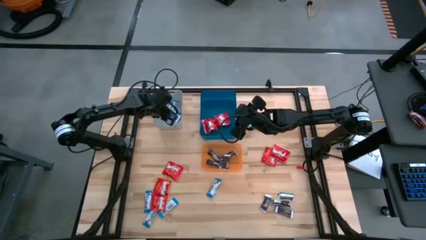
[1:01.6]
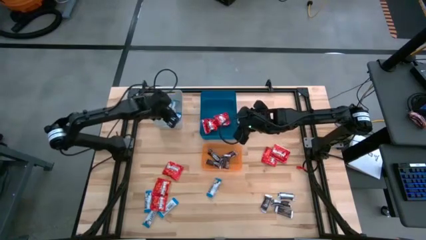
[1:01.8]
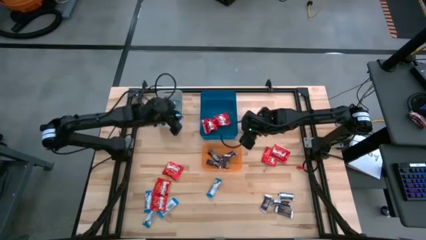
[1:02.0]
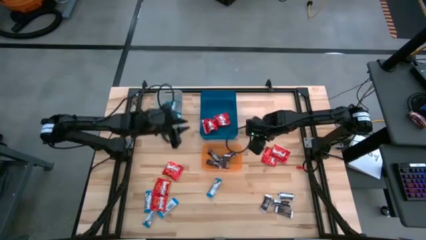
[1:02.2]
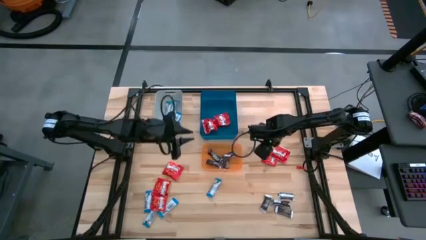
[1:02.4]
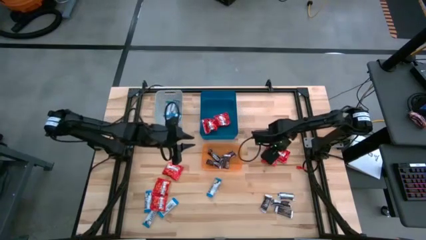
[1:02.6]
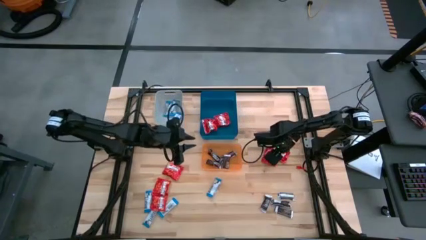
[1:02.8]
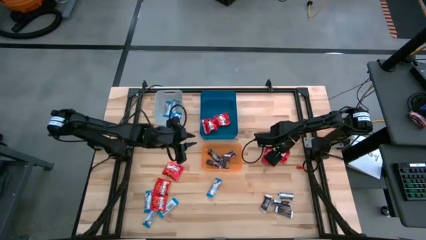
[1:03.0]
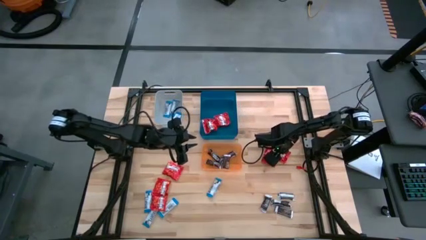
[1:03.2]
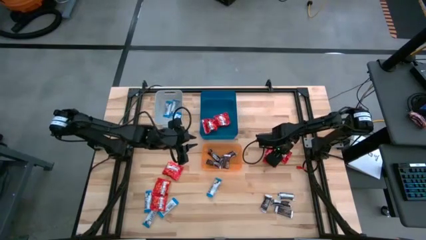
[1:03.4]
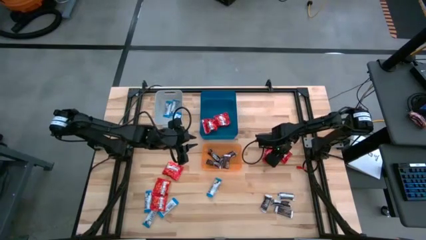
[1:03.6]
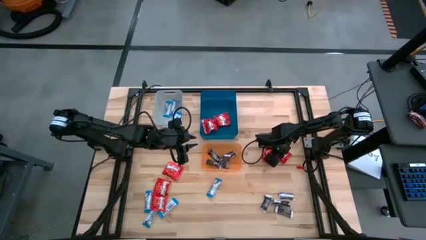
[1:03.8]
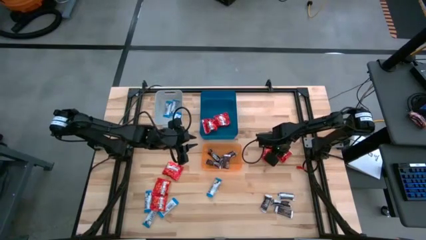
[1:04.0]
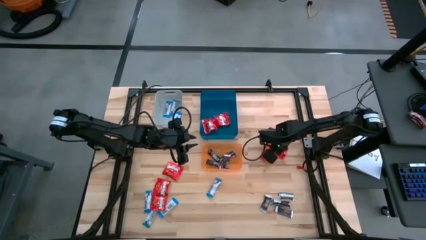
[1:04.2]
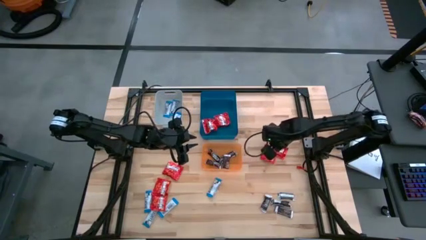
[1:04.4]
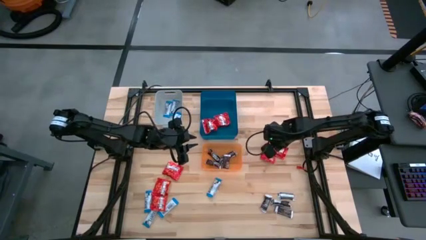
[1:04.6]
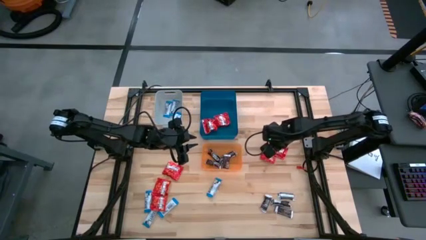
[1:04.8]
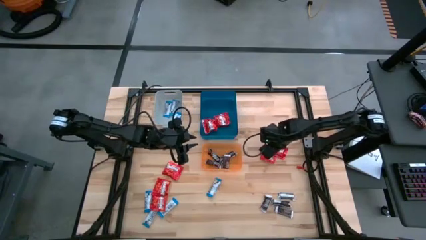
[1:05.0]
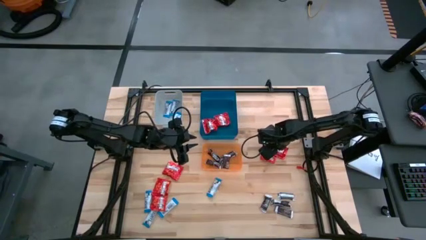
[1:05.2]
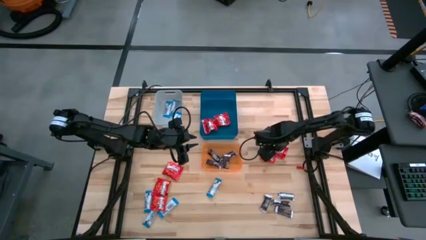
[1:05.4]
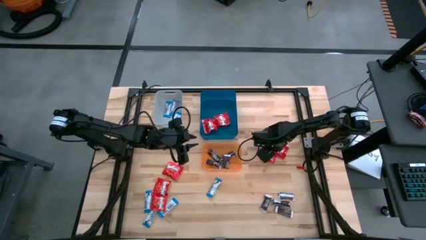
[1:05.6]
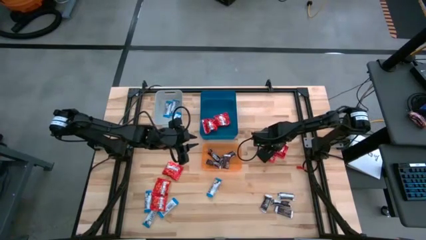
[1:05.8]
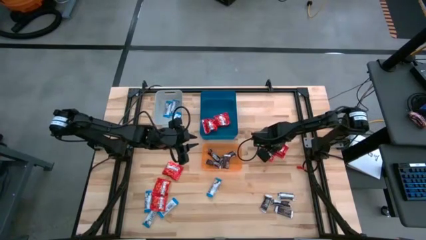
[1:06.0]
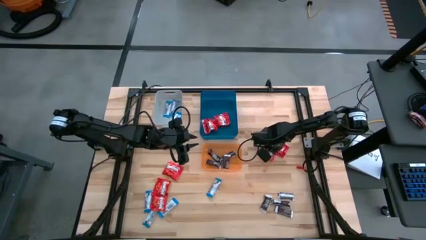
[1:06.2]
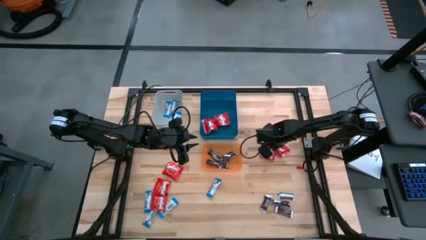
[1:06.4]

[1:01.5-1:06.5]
Task: Sort candy
Put the red candy into the blue bin

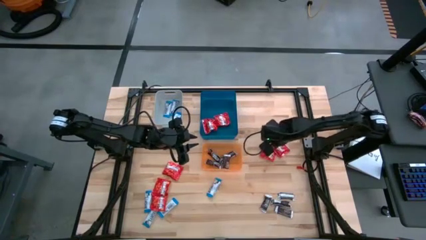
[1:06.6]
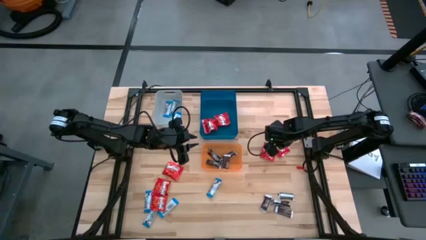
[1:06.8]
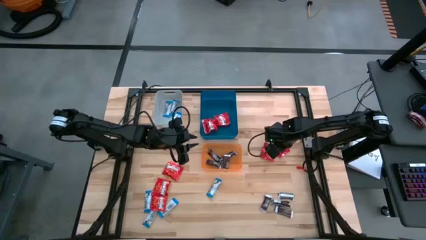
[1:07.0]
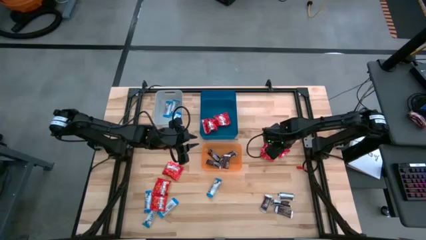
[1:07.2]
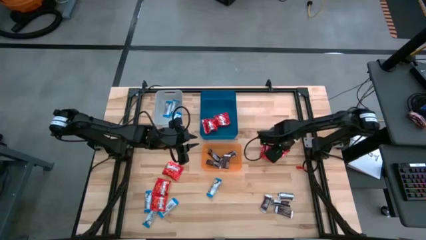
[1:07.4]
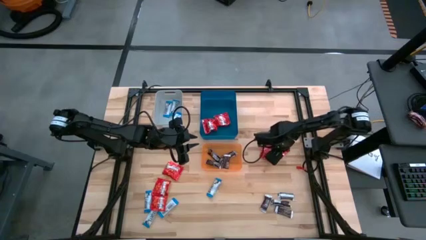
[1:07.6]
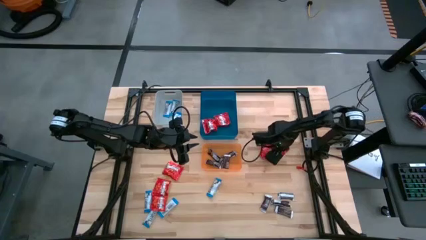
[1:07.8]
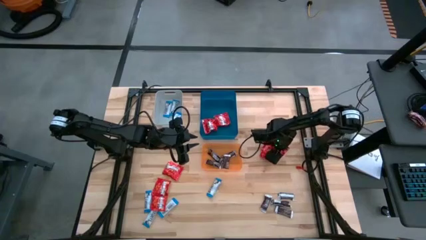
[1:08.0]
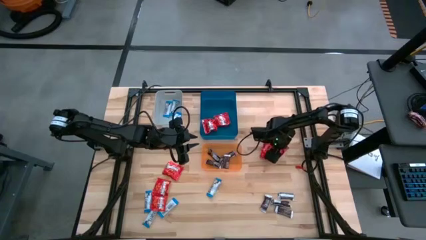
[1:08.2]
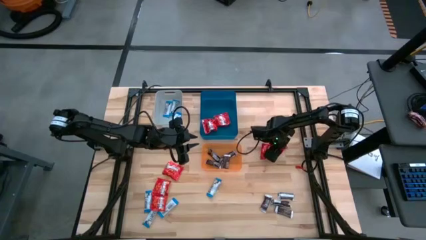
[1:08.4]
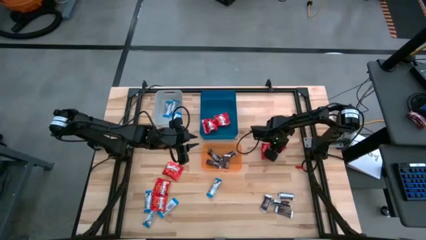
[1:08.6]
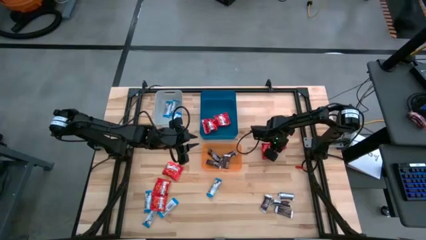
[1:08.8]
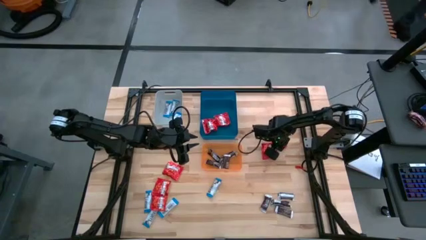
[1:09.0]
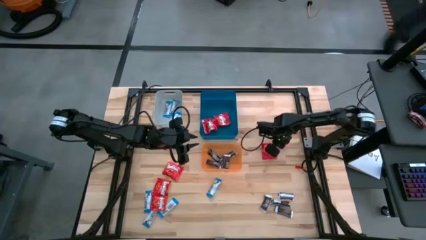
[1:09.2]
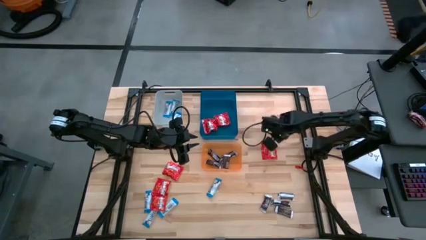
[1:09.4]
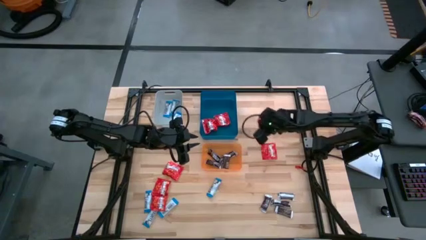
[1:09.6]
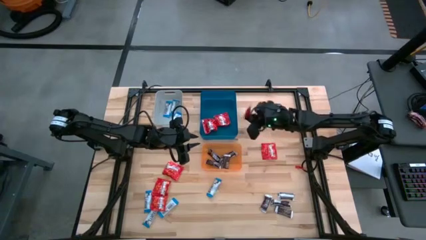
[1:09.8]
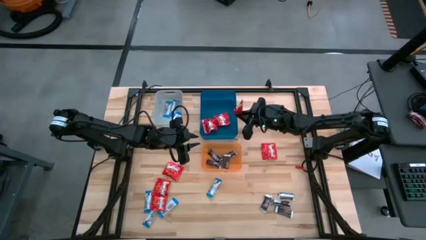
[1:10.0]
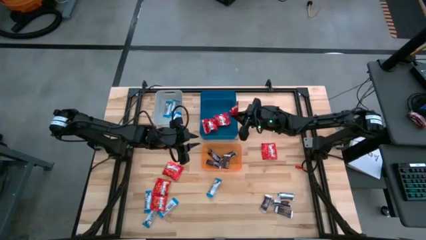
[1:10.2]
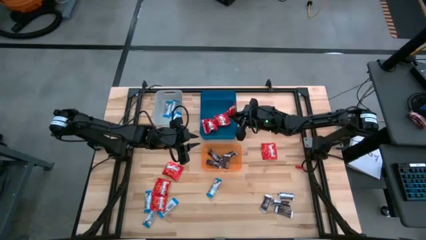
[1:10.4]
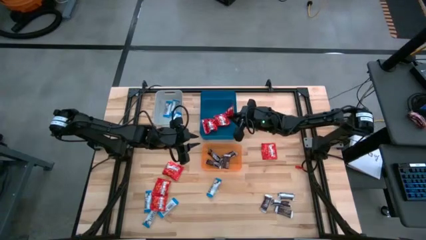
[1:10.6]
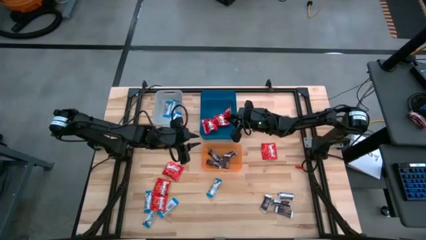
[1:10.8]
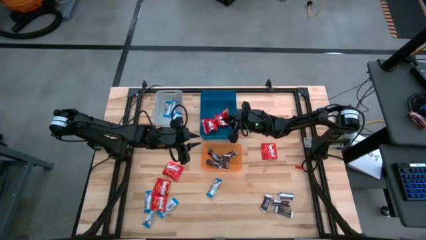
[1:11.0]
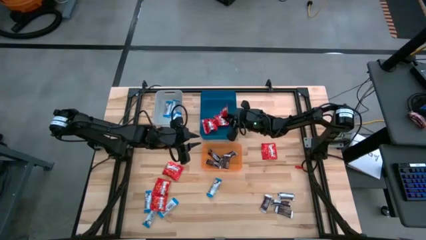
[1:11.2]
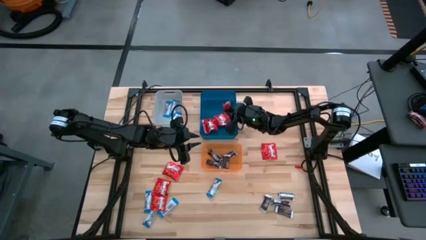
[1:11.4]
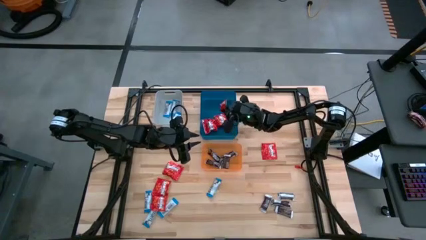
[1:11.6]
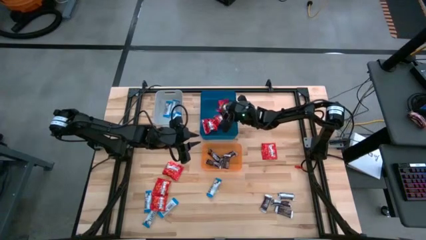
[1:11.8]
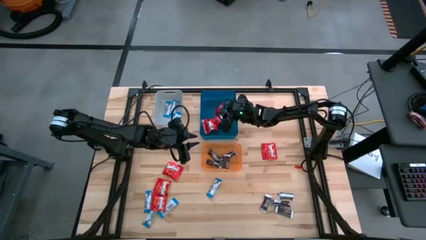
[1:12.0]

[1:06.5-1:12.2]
Put the red candy into the blue bin

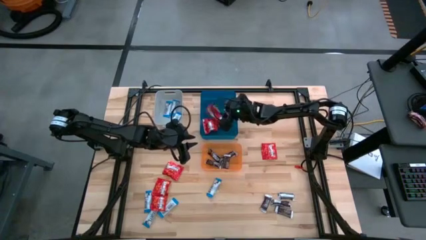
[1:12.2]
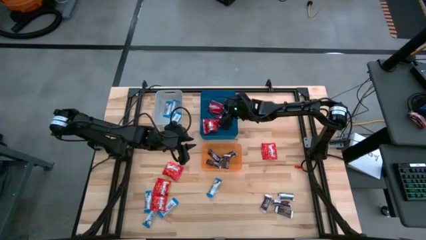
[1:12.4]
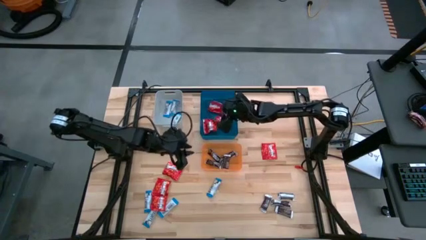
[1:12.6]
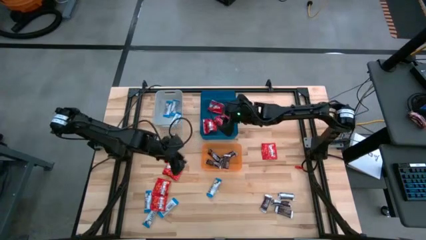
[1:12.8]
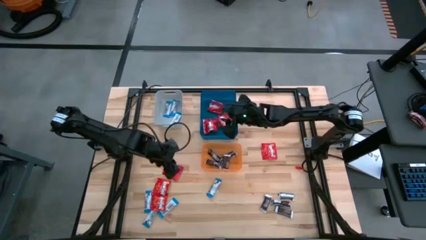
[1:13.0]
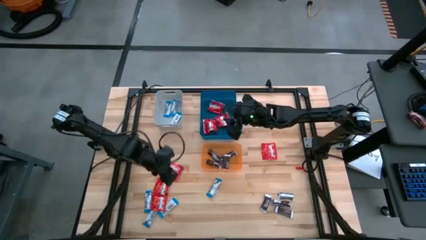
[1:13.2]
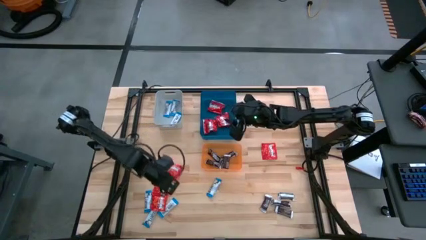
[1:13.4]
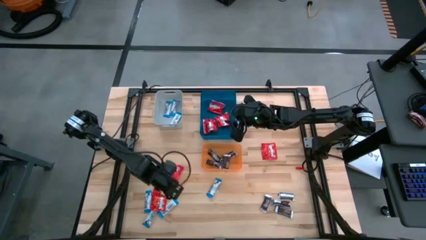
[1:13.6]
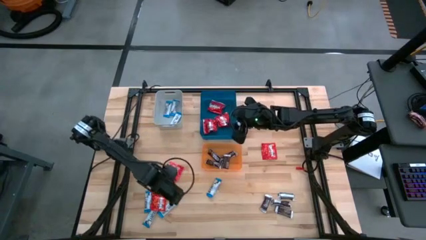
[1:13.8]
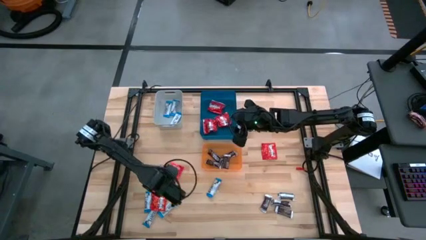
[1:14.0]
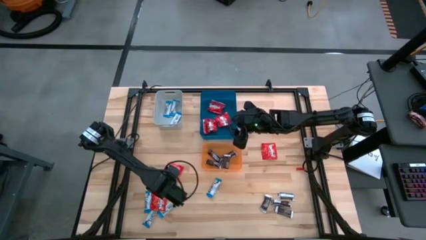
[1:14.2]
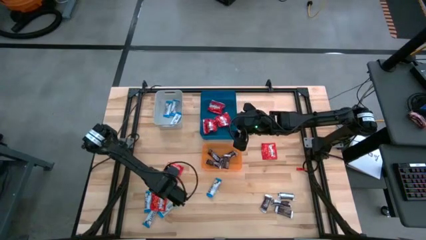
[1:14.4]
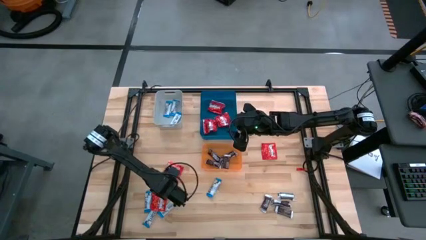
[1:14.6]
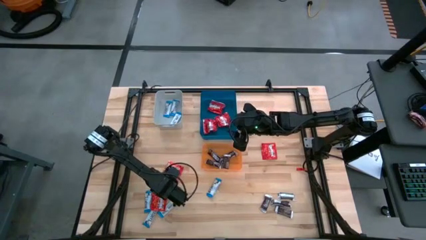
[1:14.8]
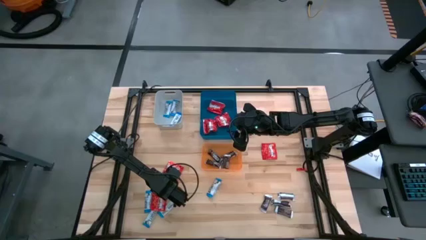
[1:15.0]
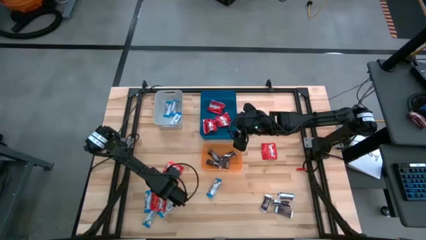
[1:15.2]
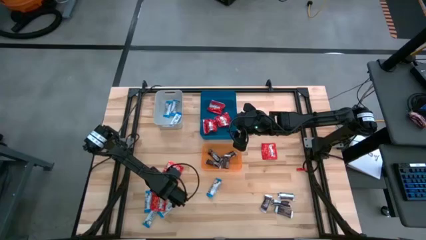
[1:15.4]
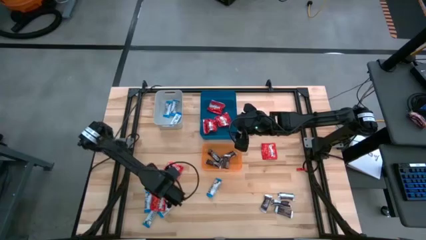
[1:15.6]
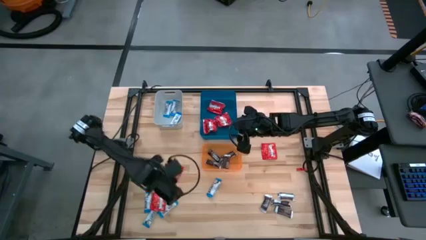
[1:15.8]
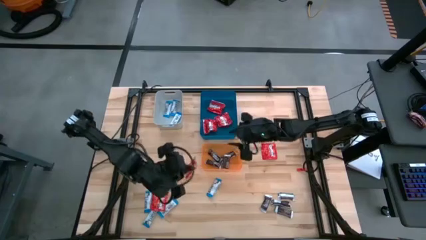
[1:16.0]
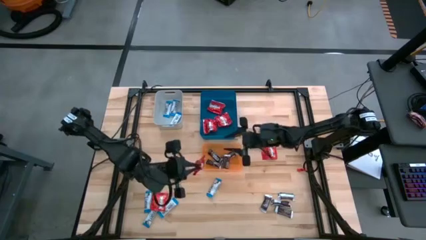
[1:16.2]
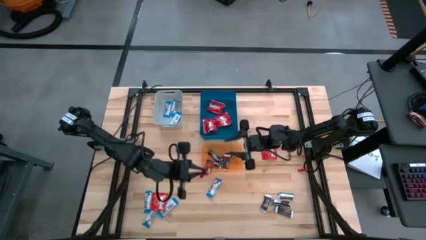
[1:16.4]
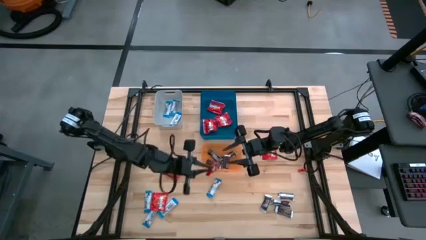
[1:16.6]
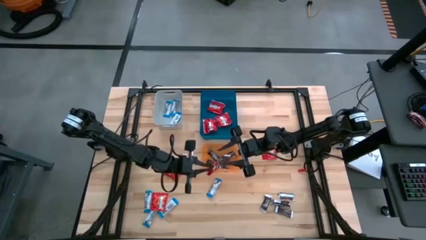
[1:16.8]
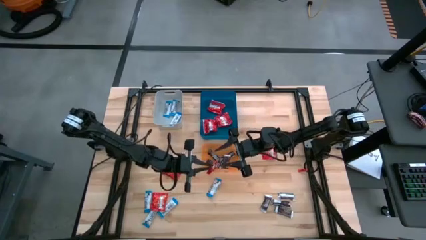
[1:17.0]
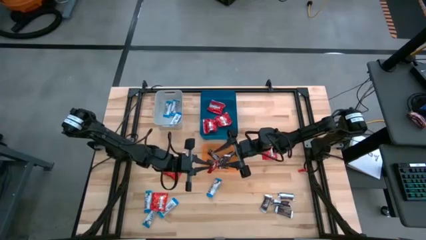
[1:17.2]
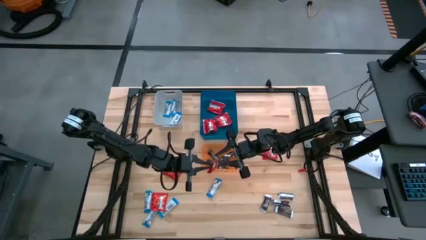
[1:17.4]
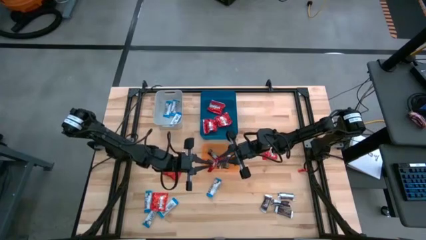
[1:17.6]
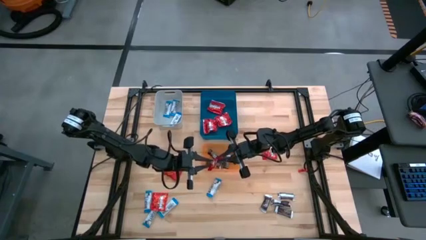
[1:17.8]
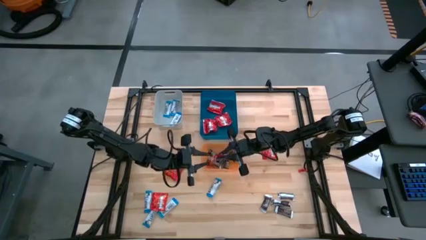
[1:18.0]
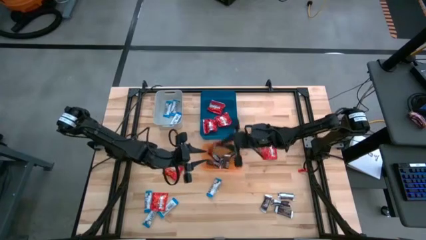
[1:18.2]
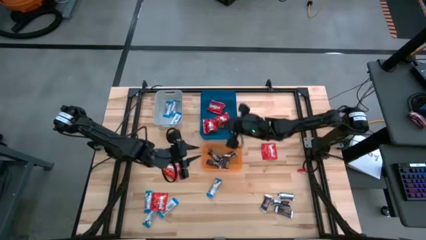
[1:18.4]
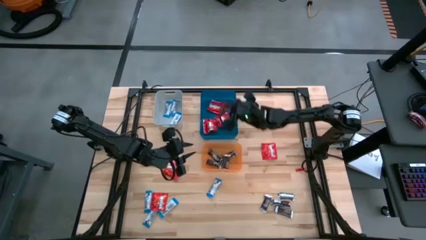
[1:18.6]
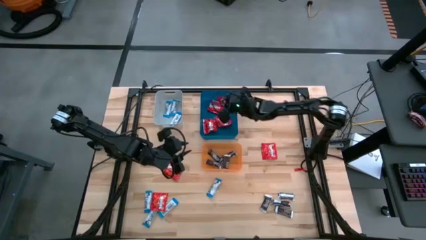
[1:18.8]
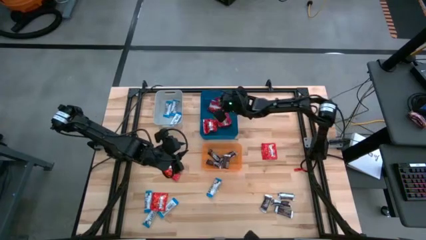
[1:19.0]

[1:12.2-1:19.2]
Put the red candy into the blue bin
